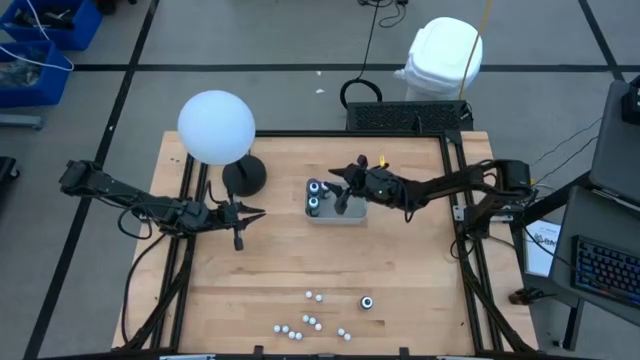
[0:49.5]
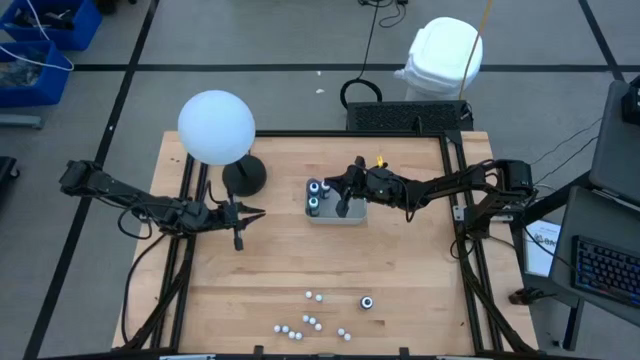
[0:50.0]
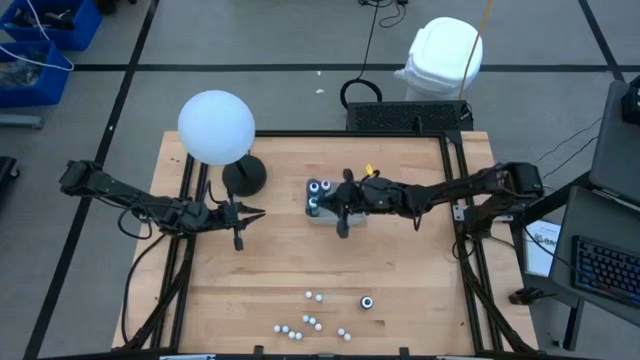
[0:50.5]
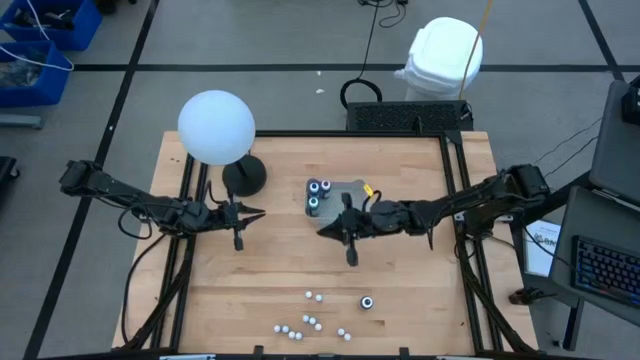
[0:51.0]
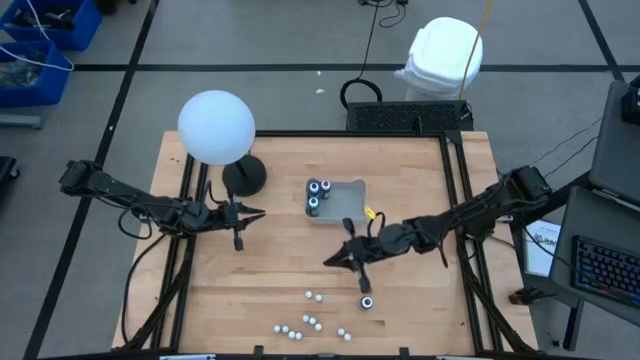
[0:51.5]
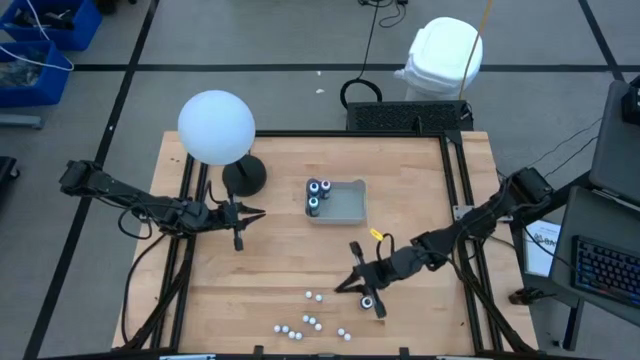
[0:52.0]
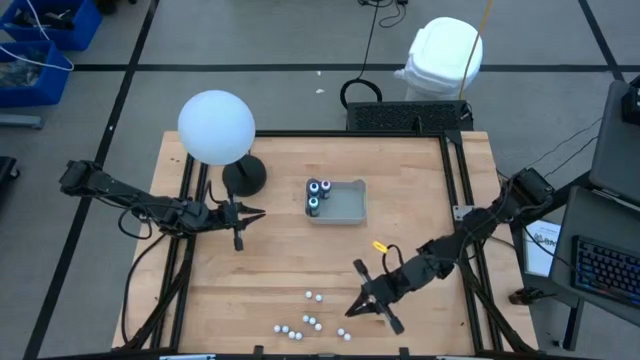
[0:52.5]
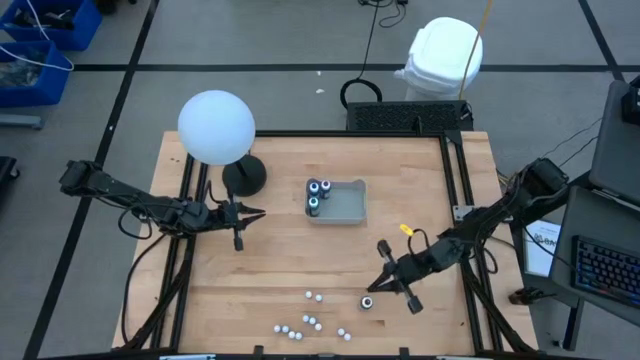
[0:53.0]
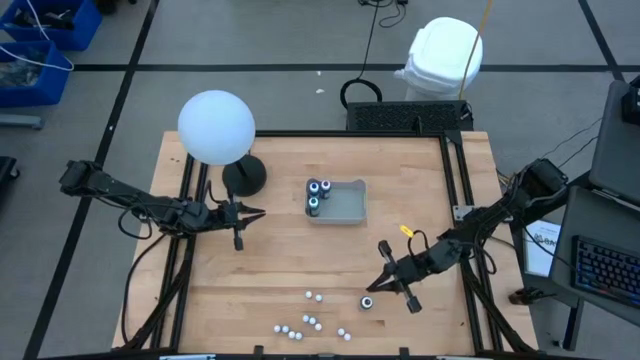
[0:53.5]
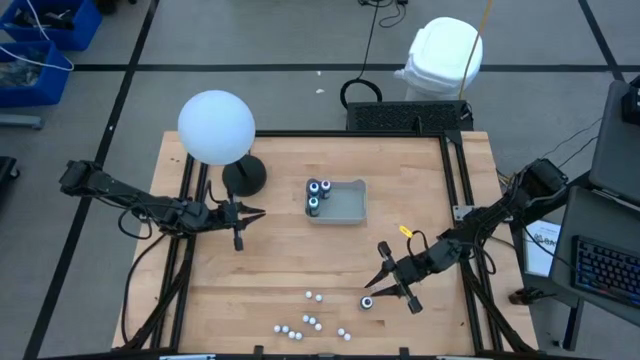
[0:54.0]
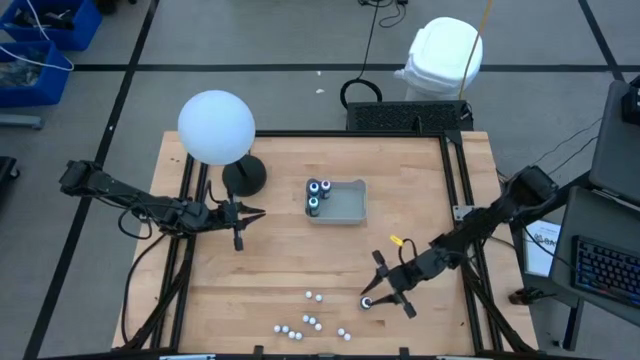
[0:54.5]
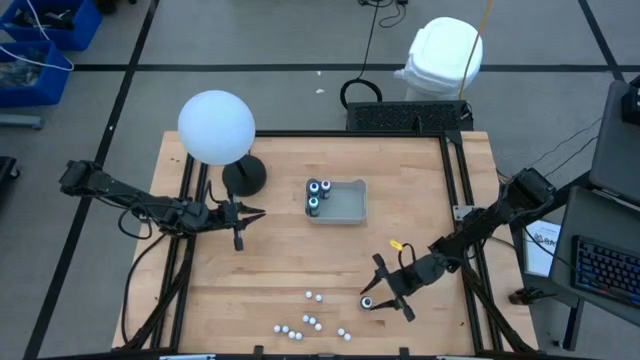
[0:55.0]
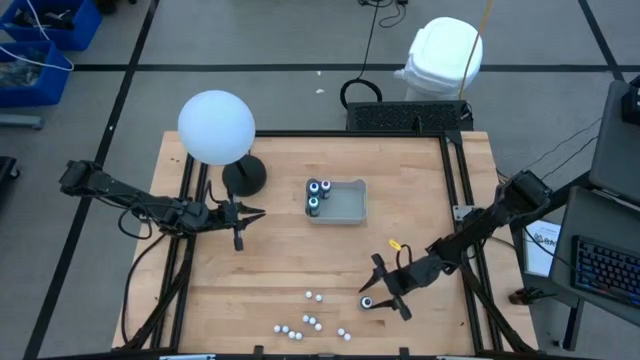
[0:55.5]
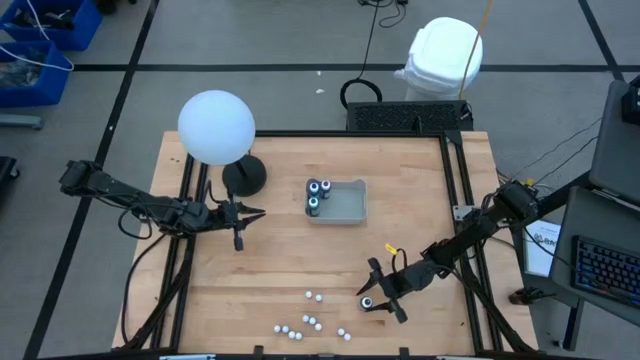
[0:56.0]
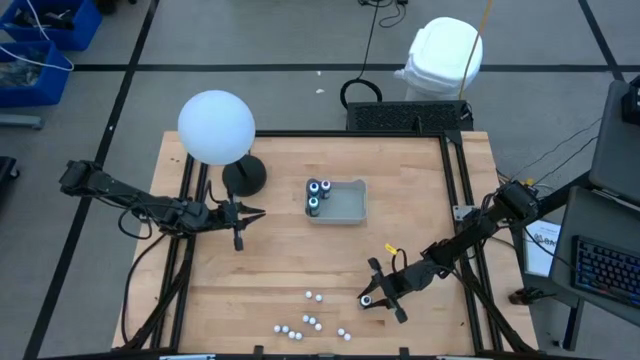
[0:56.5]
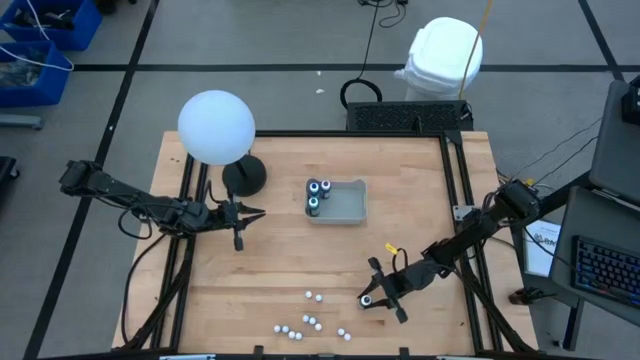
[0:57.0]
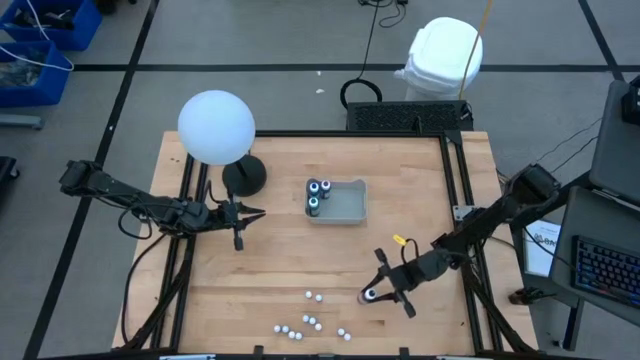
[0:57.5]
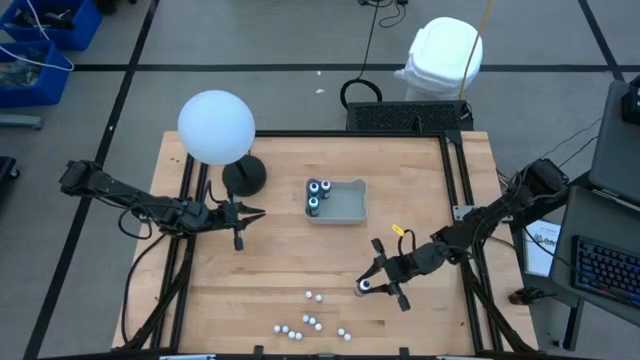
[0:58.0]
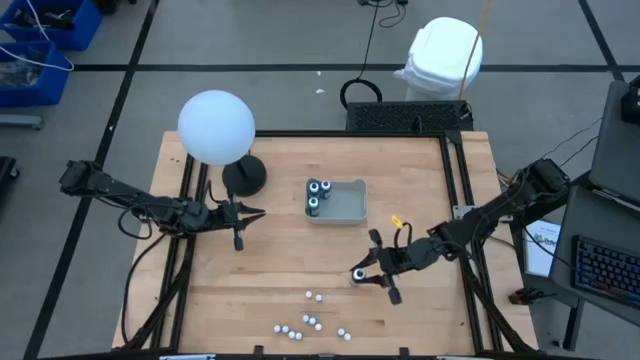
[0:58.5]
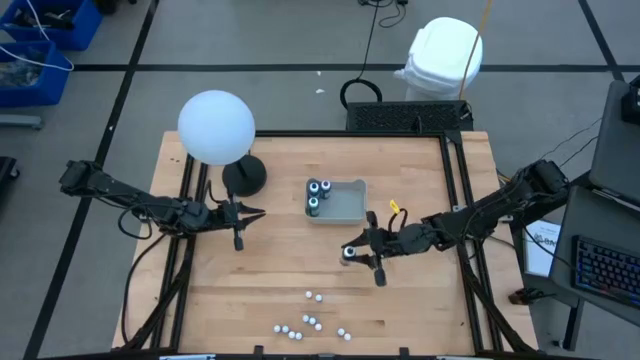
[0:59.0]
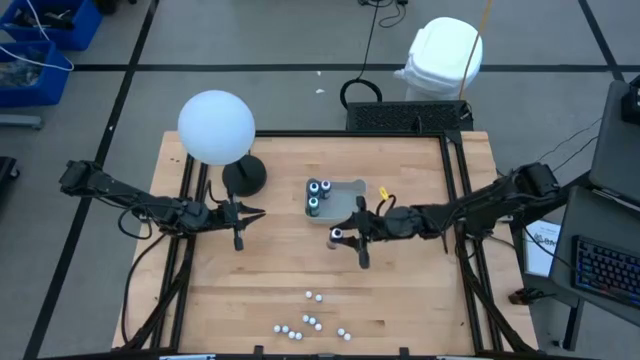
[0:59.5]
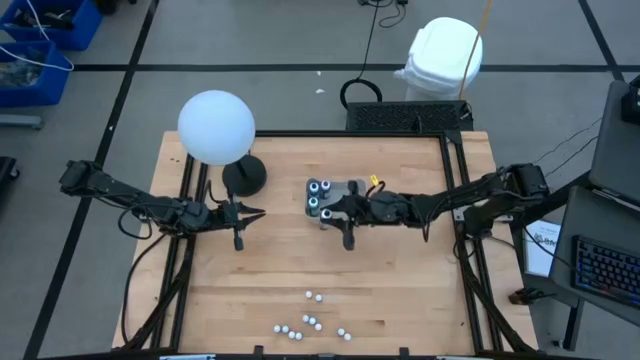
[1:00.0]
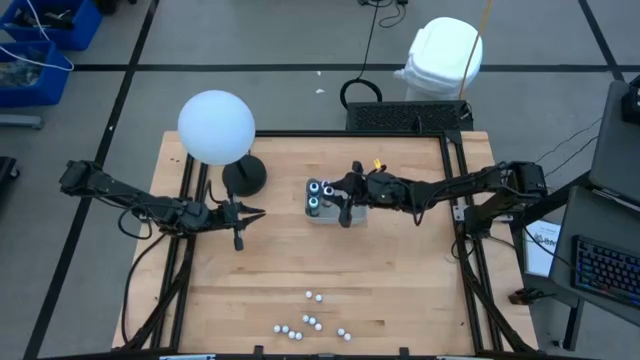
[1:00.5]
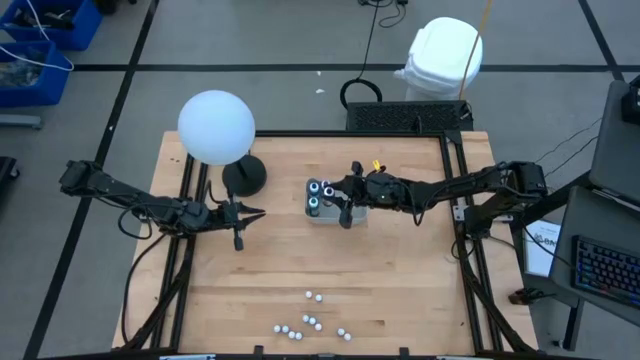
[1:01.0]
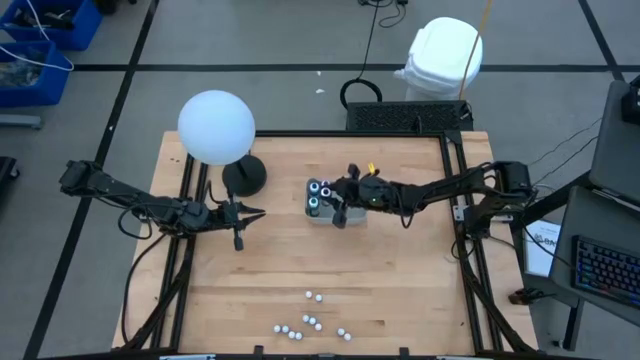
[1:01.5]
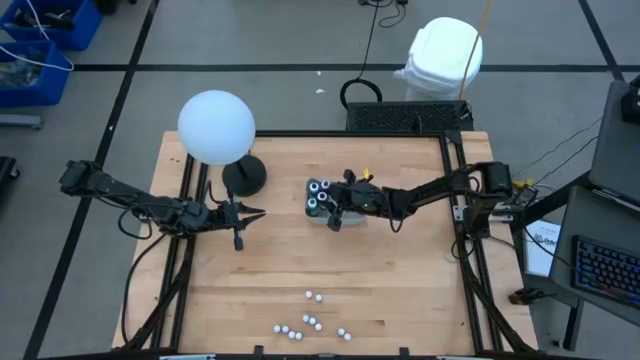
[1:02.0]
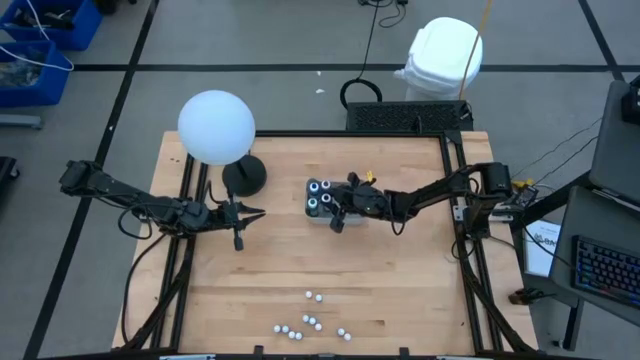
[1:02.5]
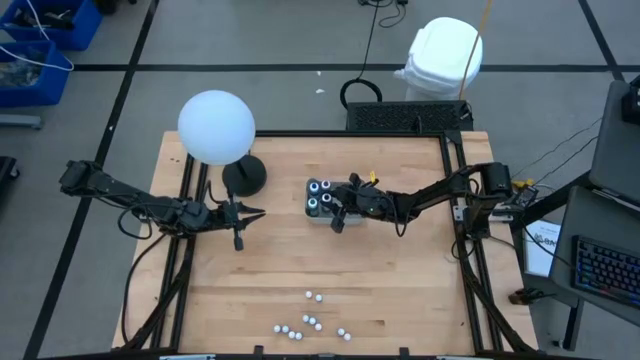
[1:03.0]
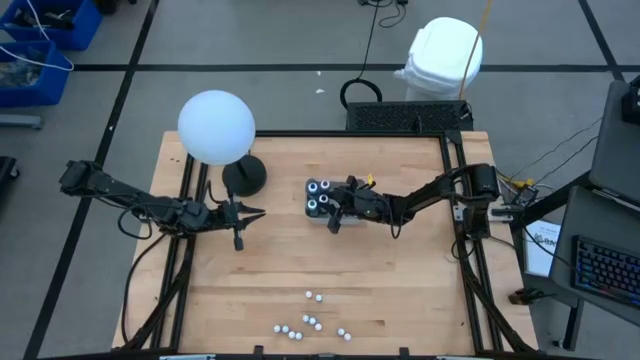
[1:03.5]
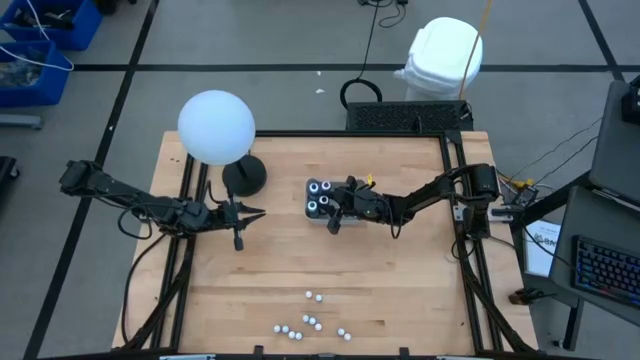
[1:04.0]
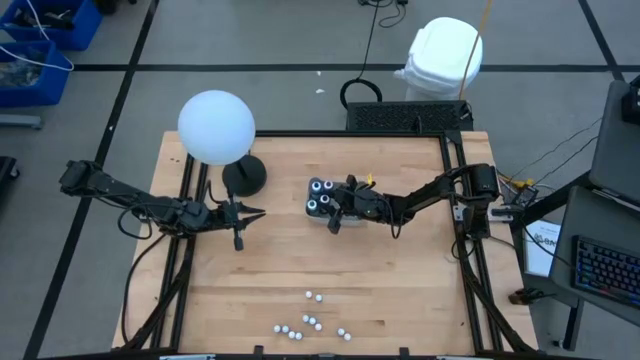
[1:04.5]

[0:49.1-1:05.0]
Task: Pick & Place food coloring
Put the big black food coloring bottle into the gray bin

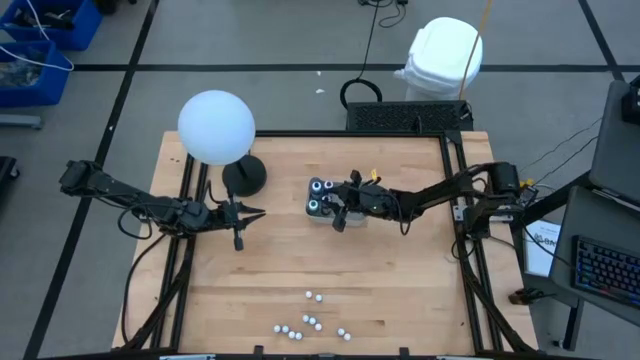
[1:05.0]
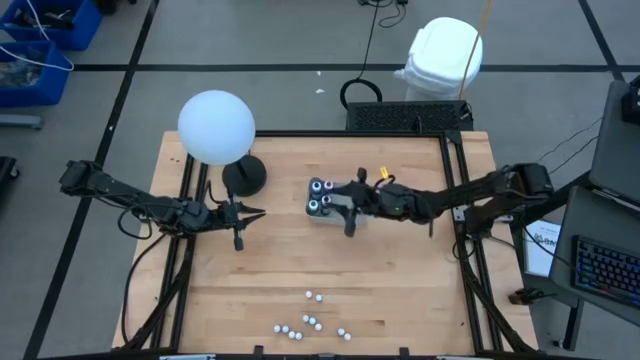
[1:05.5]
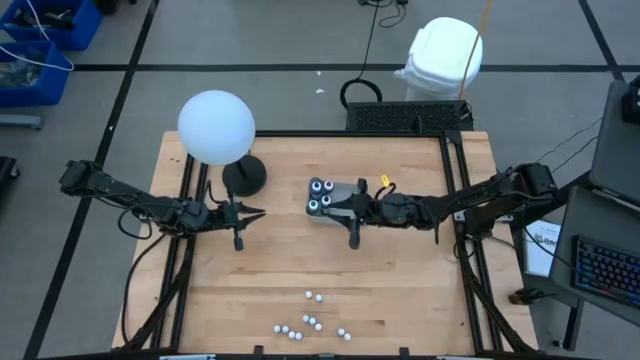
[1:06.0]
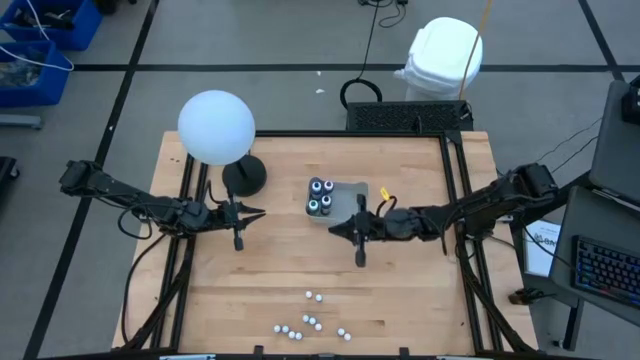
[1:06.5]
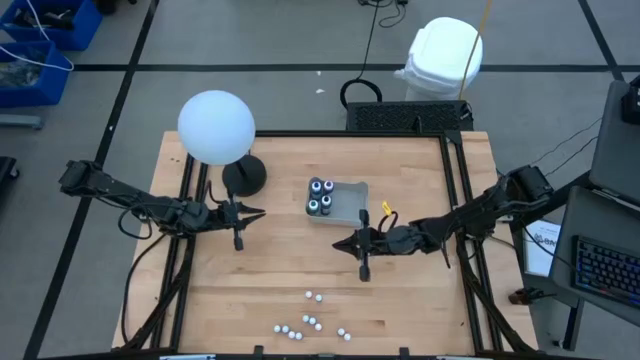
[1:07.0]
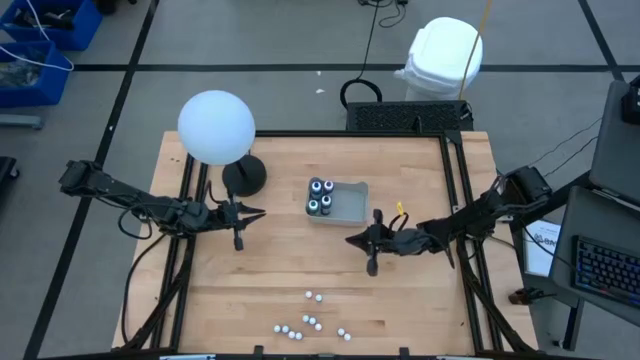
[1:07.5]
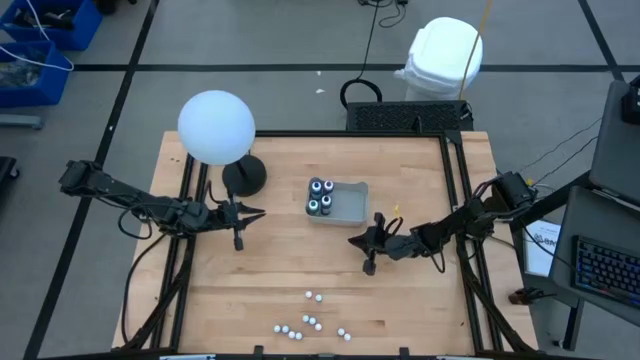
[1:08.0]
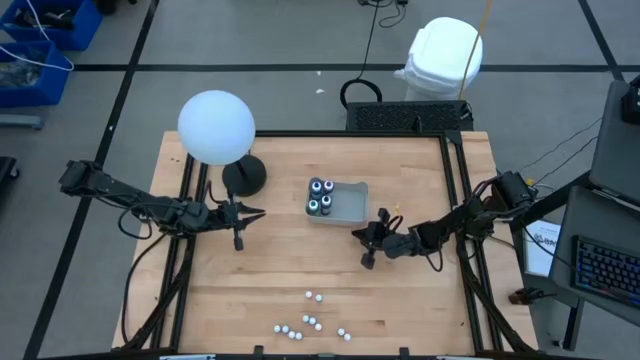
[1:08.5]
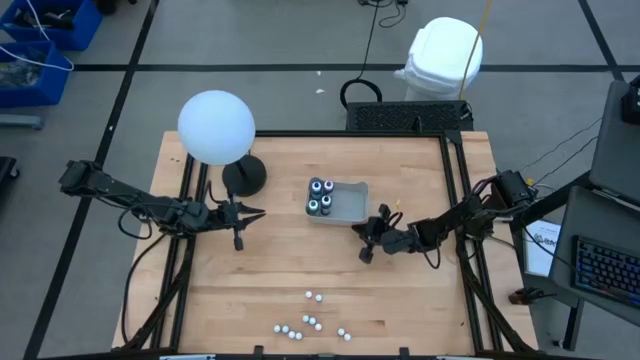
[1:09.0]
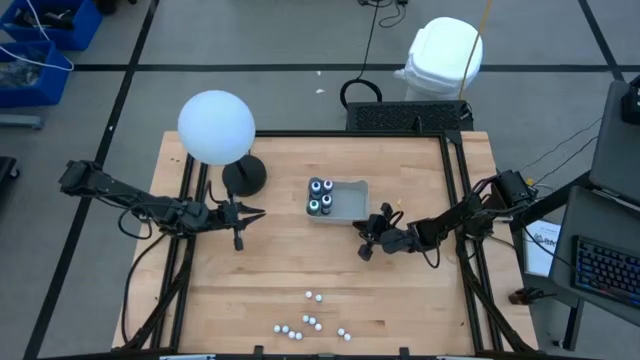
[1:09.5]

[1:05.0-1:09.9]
Adjust the gray bin on the table

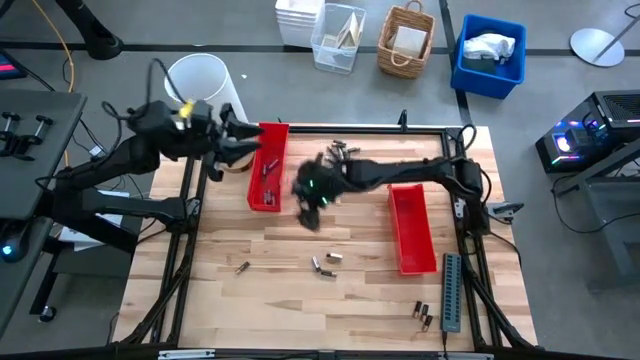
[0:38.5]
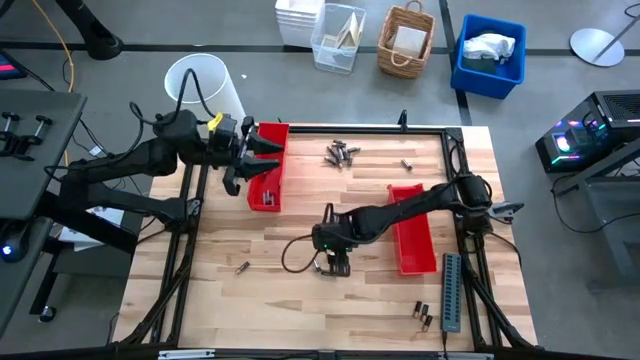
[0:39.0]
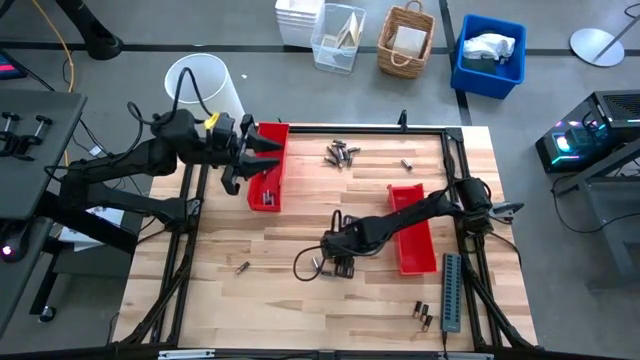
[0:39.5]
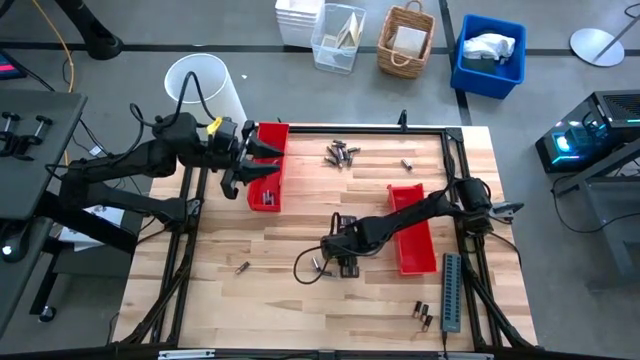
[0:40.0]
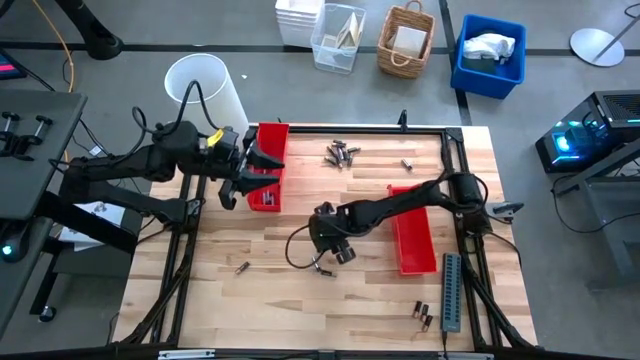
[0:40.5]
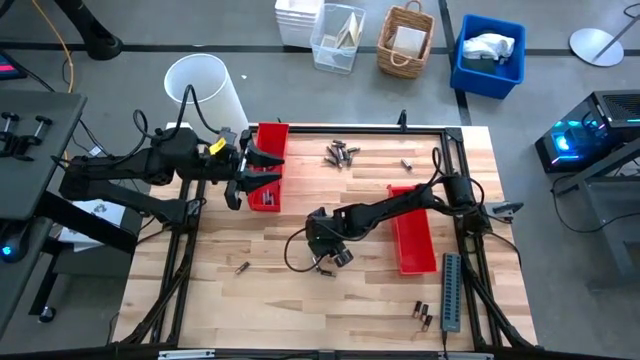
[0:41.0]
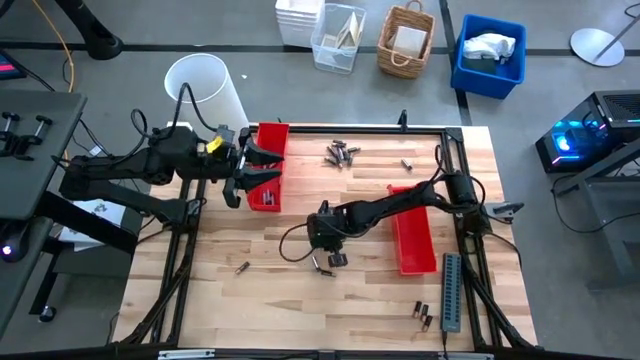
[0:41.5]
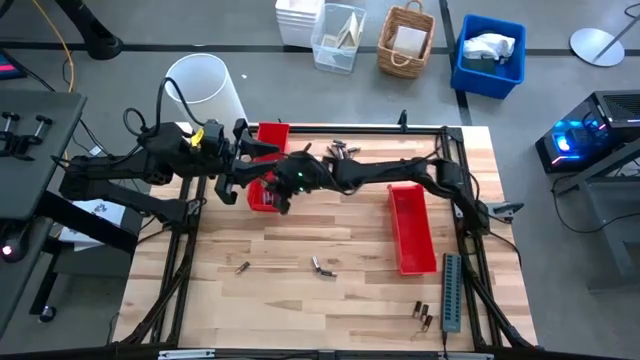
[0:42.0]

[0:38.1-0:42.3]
Task: Sort batteries
Put the silver battery into the top red bin
